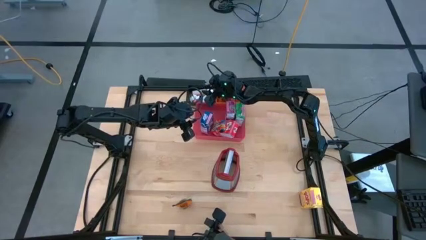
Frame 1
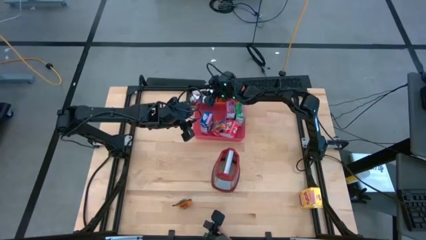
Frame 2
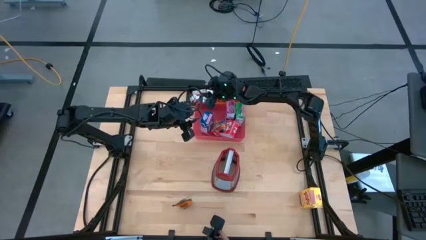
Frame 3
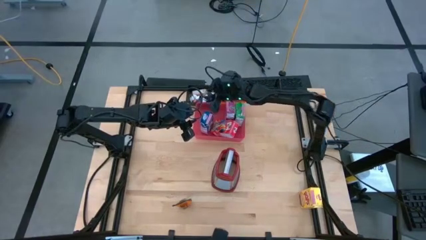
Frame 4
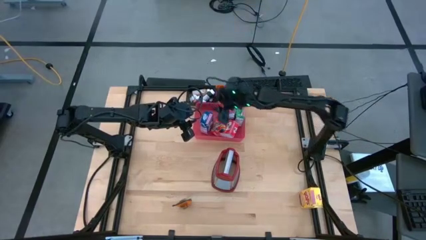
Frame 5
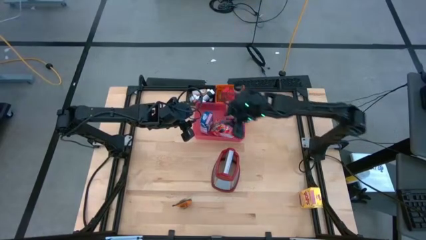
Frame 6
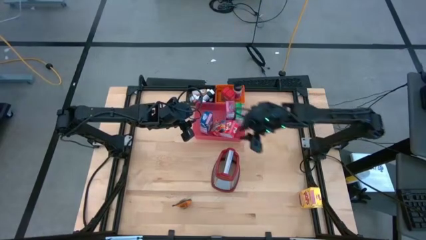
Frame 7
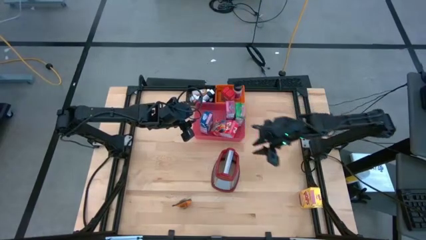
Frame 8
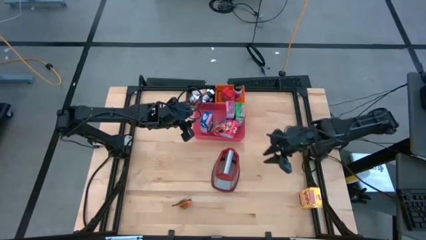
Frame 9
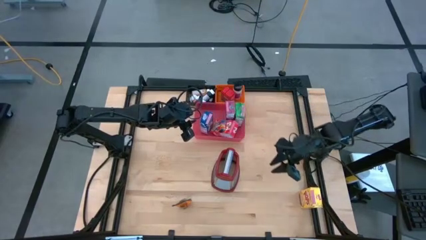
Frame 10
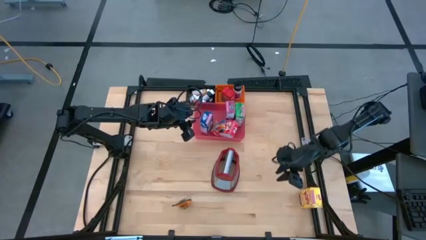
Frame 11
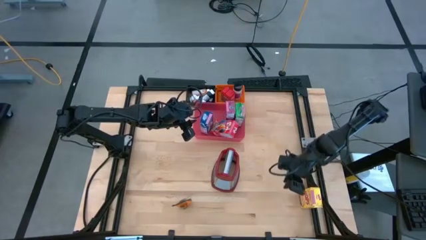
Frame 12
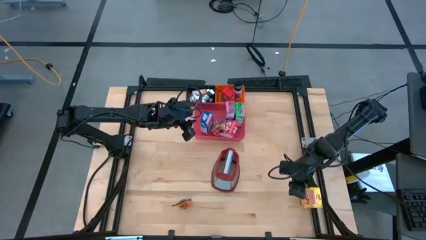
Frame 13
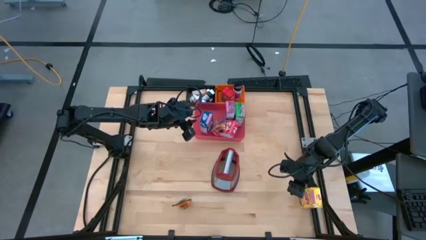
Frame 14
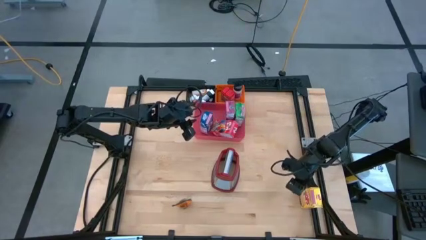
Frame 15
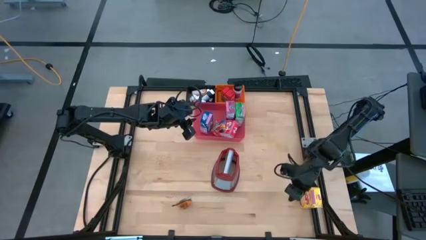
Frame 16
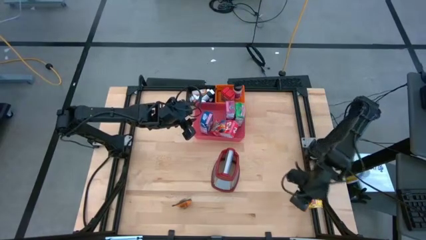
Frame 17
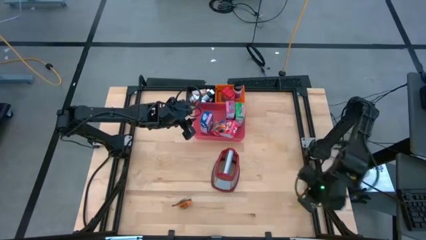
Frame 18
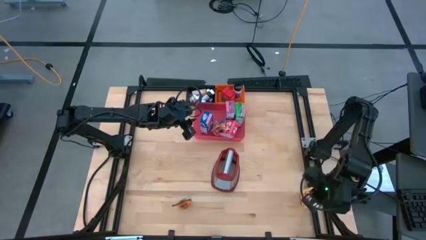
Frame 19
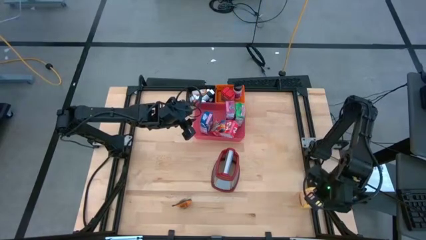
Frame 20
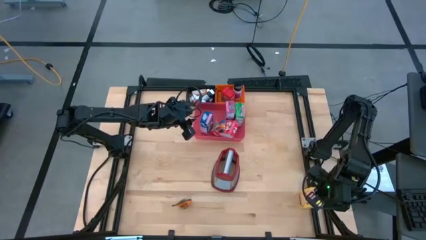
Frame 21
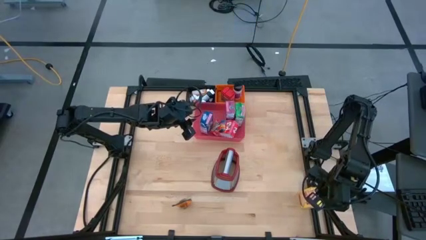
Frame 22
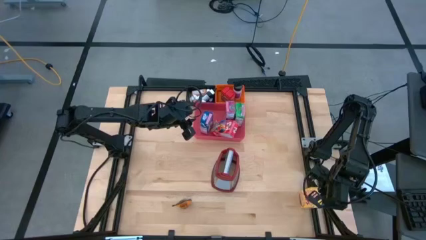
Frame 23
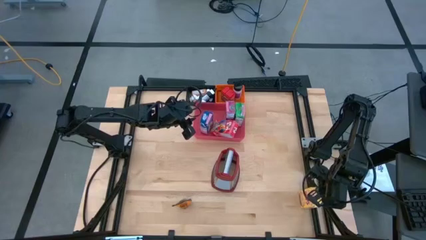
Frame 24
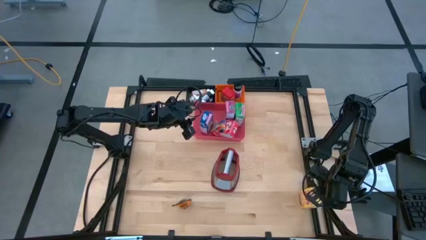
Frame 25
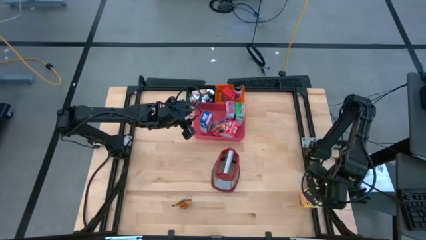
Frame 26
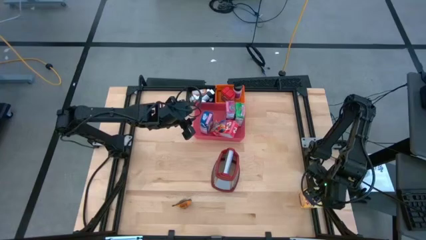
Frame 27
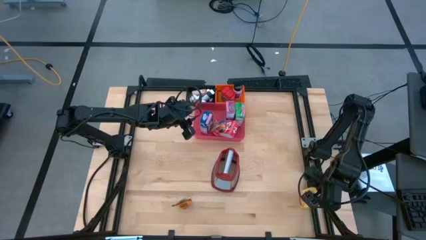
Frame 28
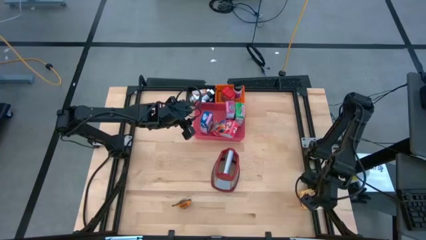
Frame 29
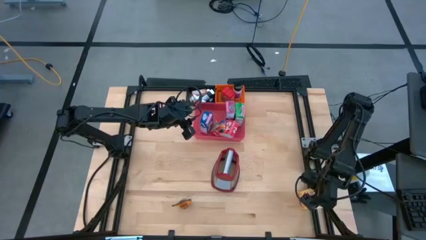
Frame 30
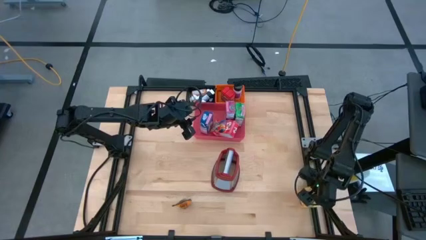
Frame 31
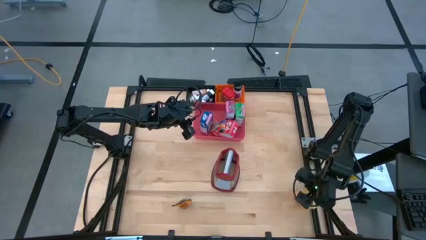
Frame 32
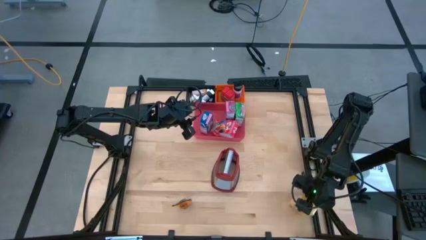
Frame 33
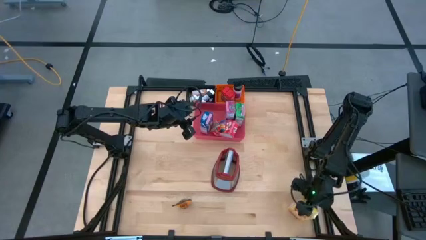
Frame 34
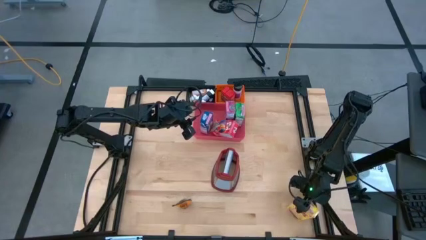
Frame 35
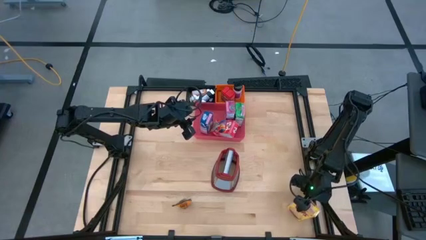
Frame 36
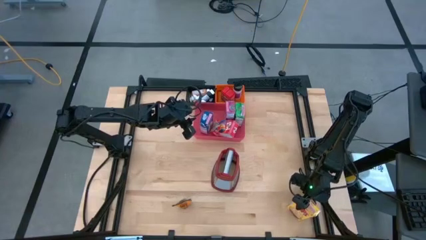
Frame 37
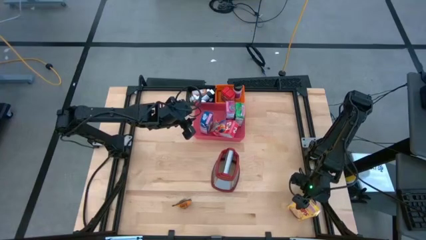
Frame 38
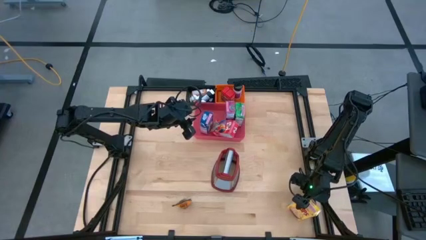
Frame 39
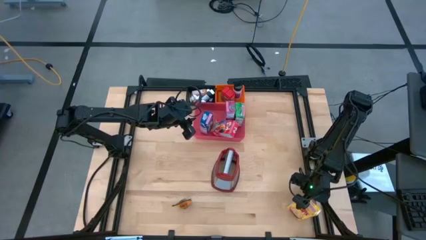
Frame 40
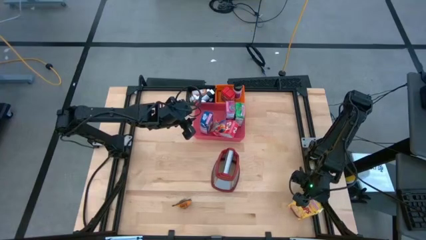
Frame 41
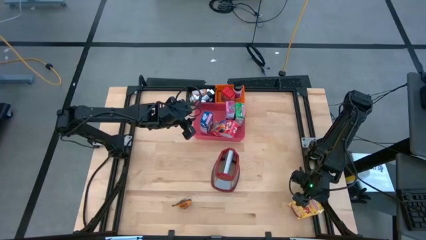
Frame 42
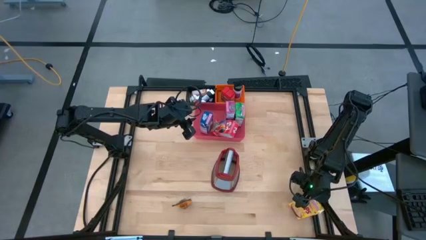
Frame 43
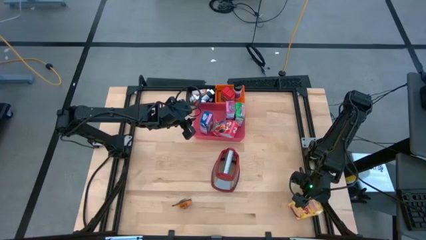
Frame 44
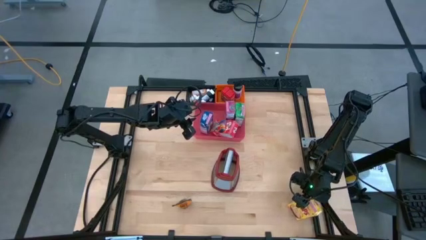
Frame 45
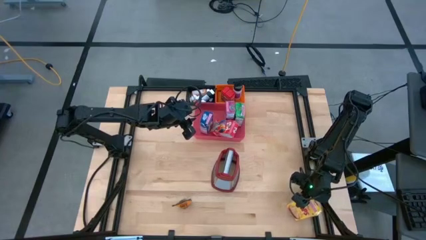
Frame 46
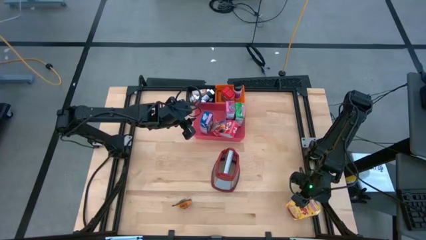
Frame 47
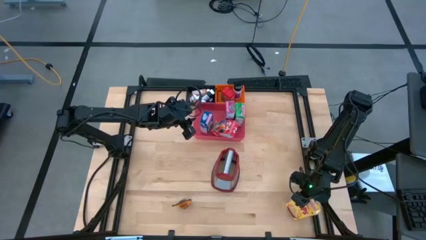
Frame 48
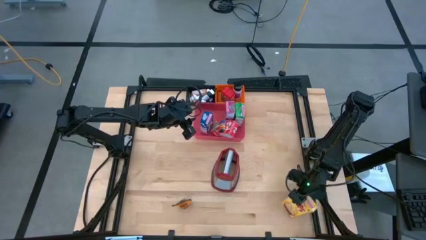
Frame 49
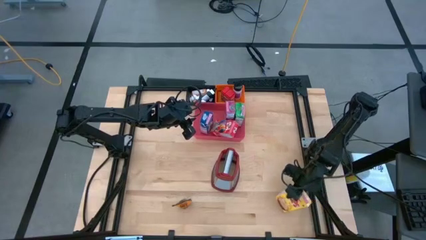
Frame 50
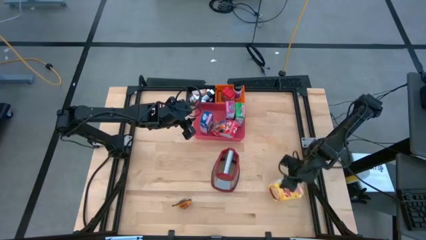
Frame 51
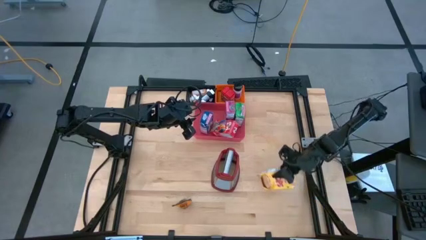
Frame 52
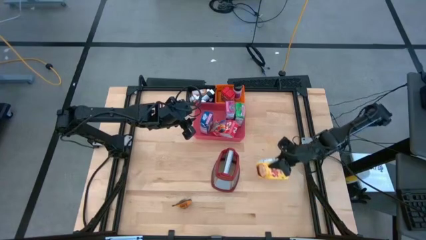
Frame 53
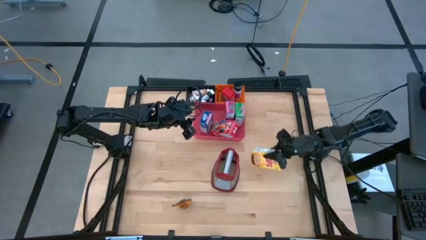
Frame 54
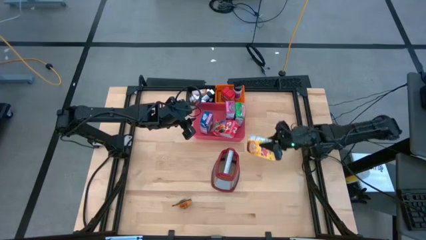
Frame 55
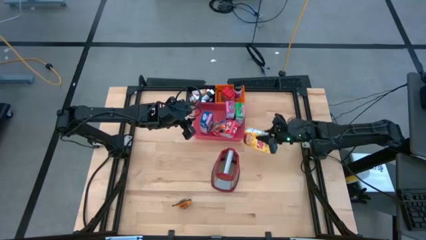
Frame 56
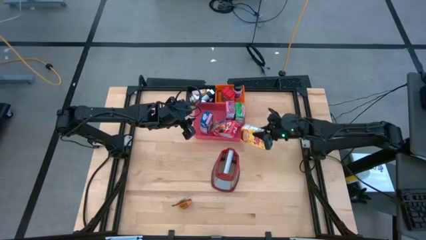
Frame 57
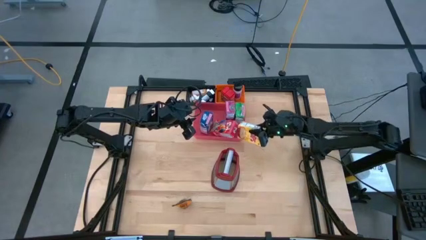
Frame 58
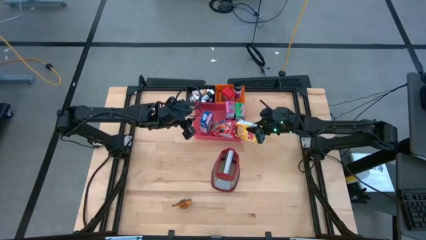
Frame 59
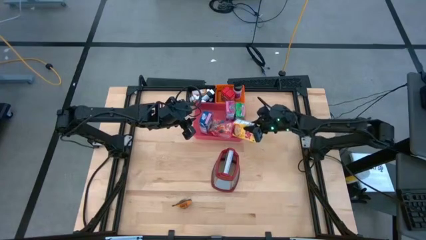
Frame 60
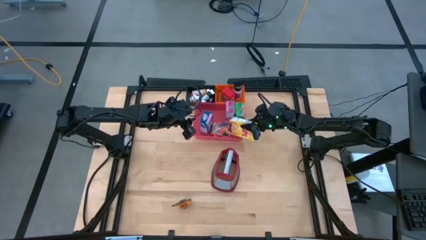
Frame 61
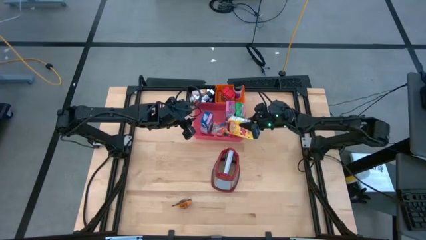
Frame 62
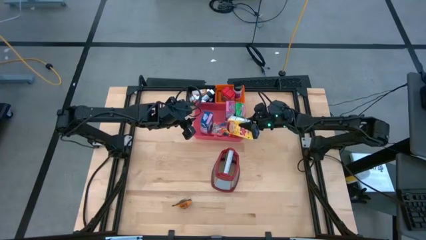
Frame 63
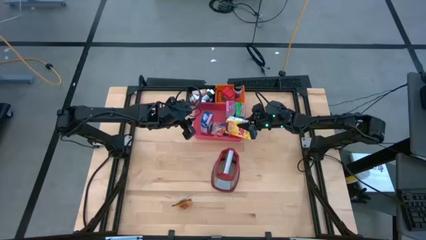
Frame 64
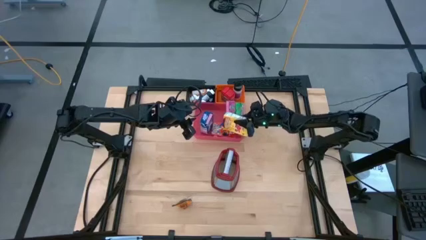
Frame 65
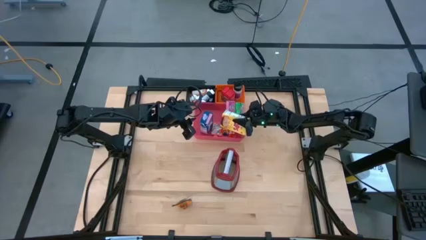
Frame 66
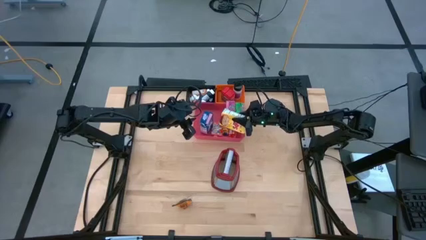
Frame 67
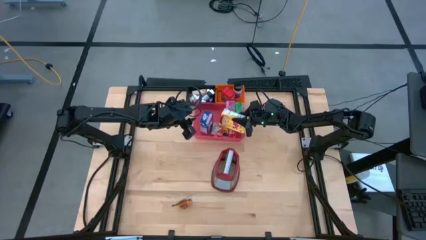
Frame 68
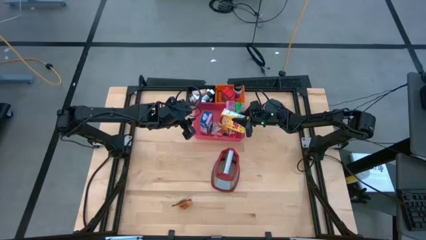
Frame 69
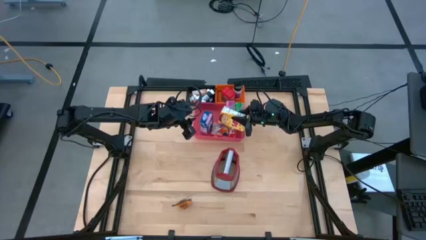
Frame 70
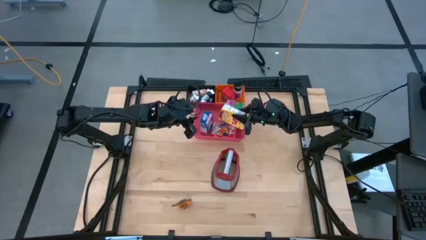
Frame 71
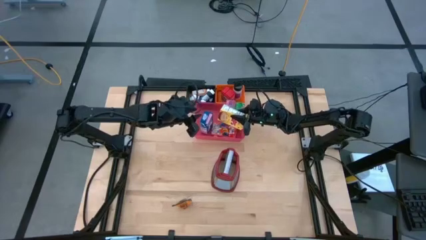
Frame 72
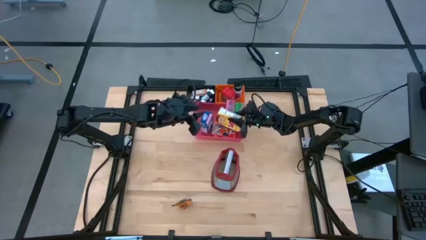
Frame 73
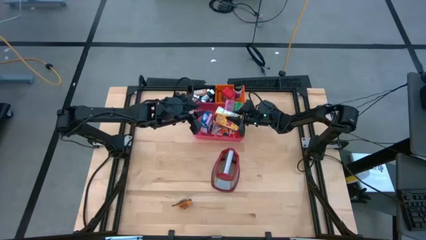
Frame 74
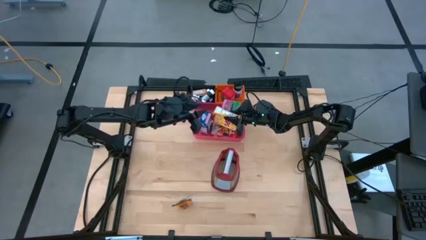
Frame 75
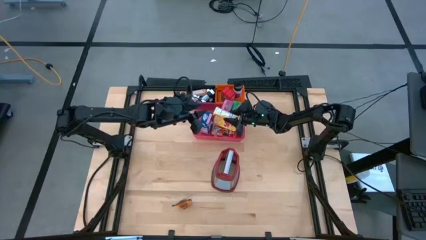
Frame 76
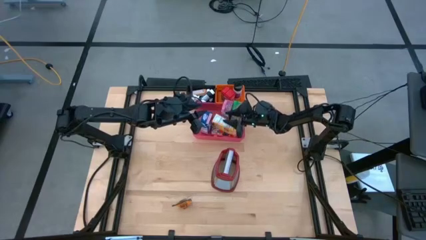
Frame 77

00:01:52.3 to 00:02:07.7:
Task: Pick & Place Kitchen Items
Put the yellow cereal box into the pink bin

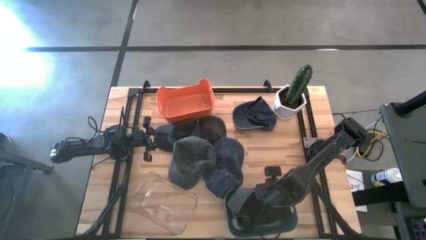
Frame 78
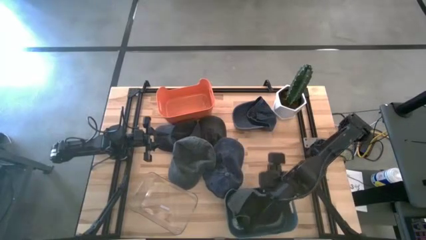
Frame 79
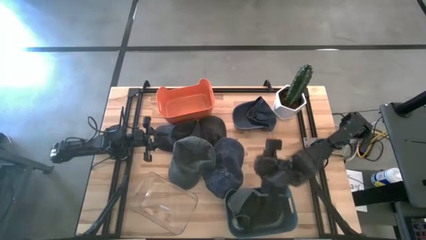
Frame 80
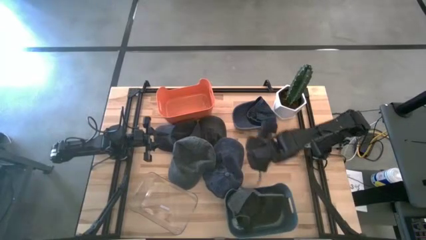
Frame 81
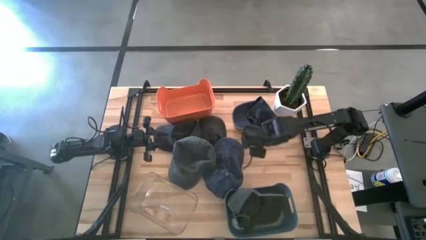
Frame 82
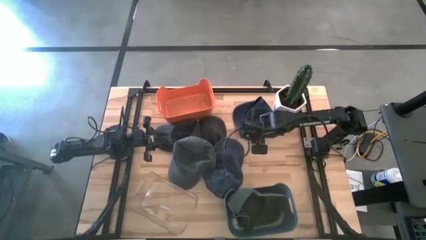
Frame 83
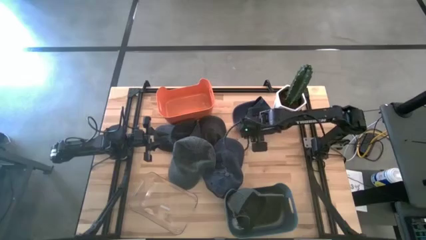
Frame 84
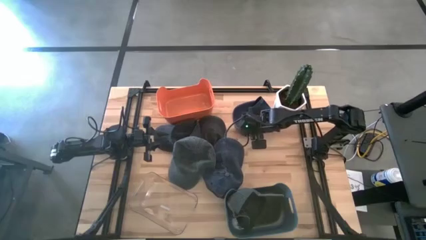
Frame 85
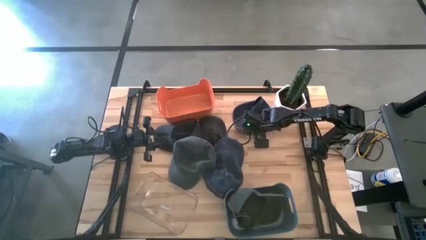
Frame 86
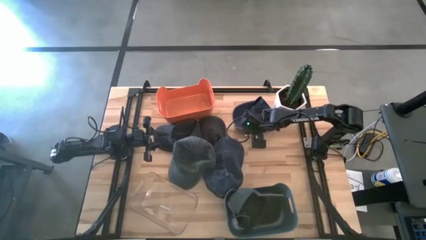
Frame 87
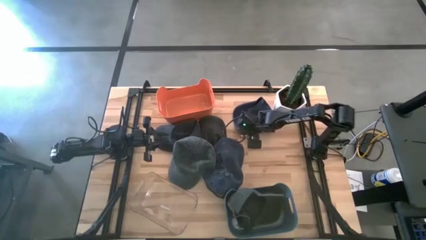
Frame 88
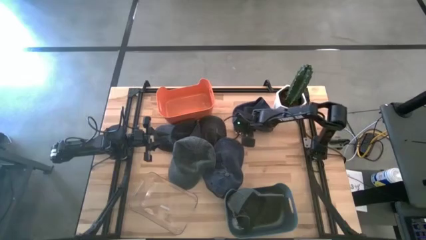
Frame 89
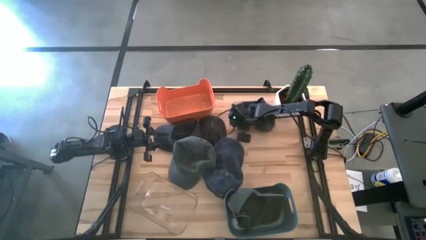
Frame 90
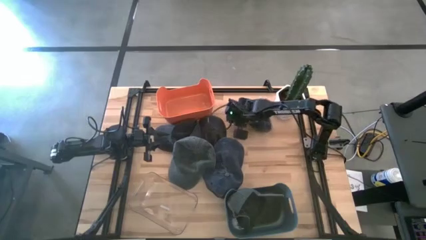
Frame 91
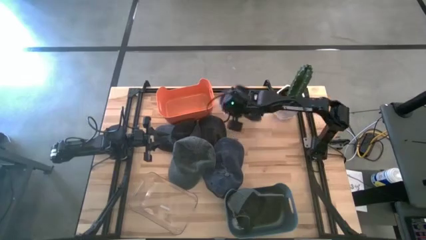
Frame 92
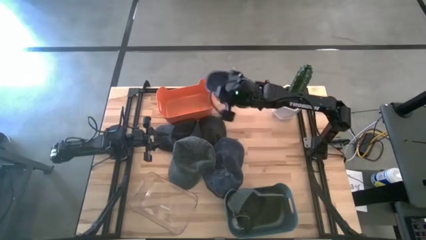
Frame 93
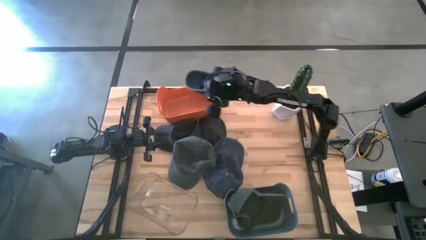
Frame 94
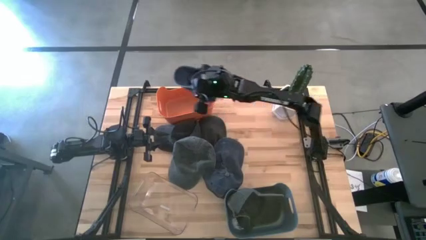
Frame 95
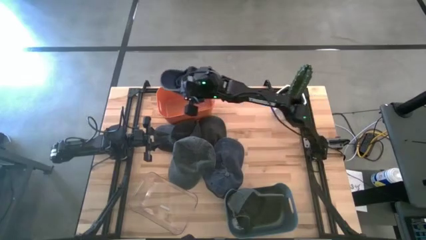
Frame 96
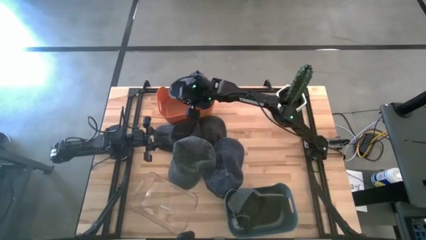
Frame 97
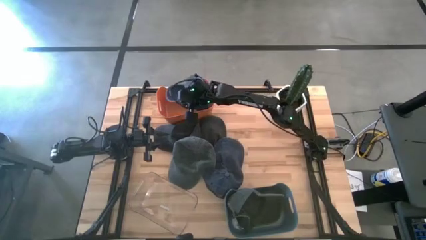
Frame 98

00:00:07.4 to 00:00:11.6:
Task: Pick & Place hat
Put the top blue cap into the orange bin
